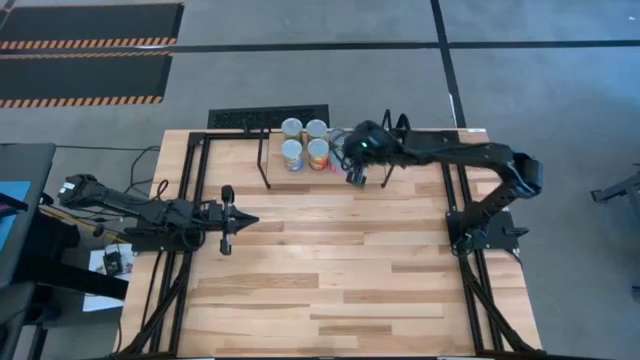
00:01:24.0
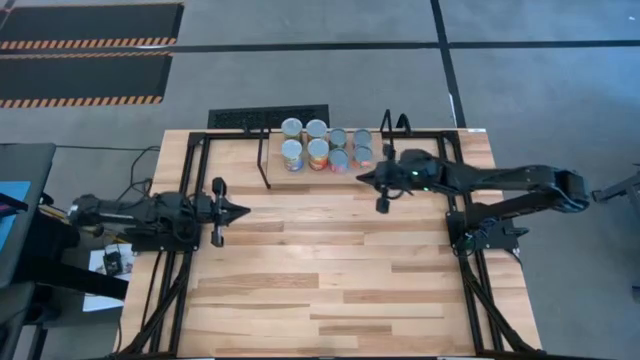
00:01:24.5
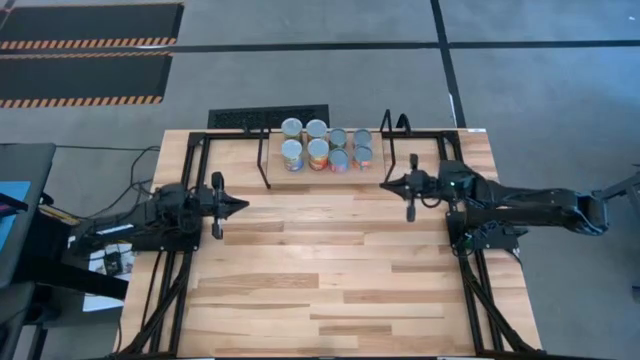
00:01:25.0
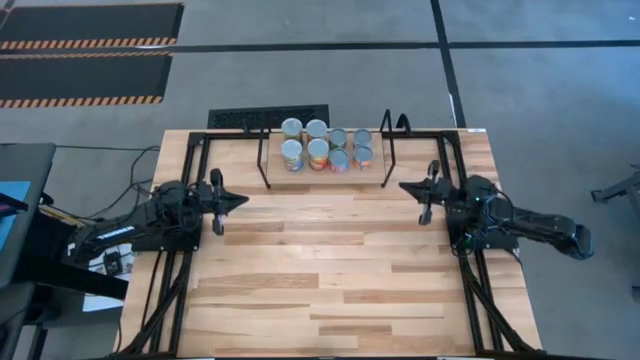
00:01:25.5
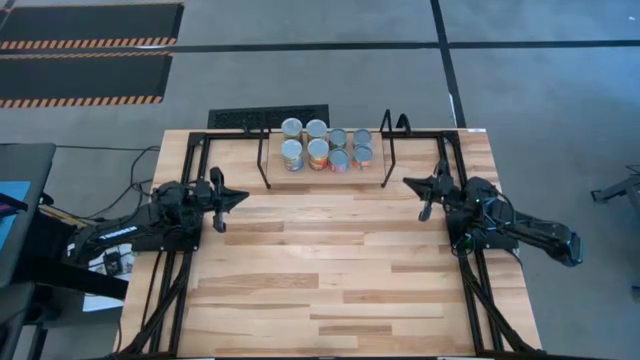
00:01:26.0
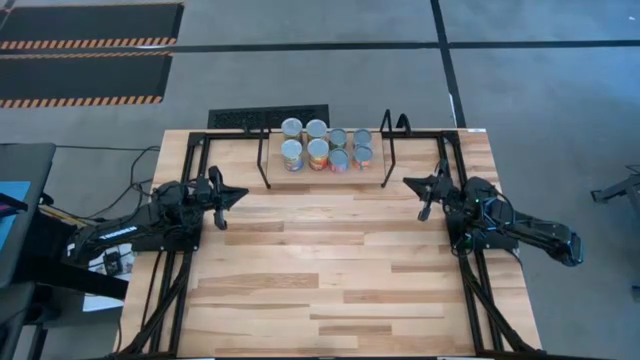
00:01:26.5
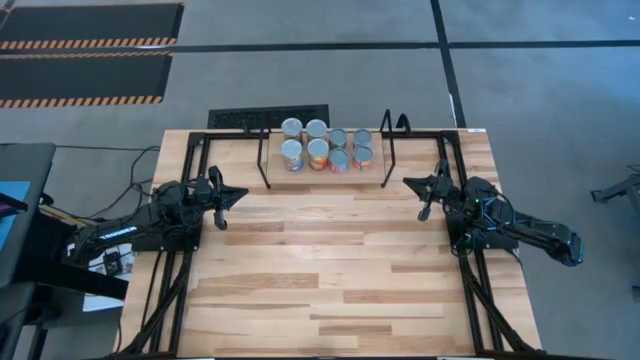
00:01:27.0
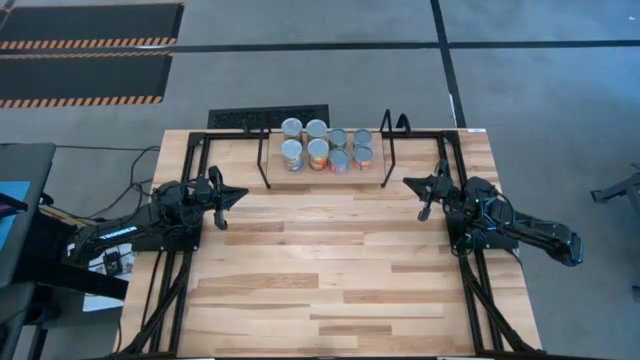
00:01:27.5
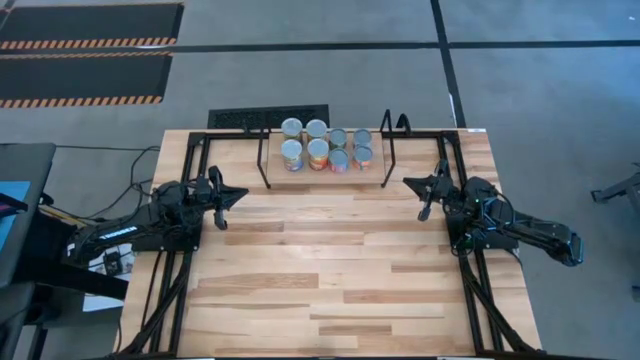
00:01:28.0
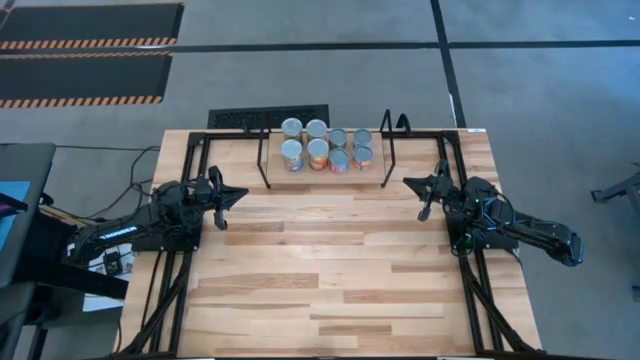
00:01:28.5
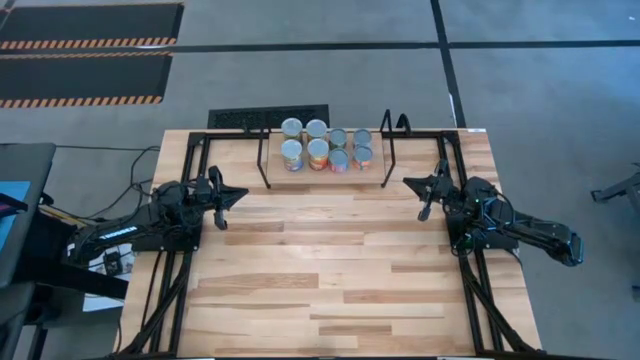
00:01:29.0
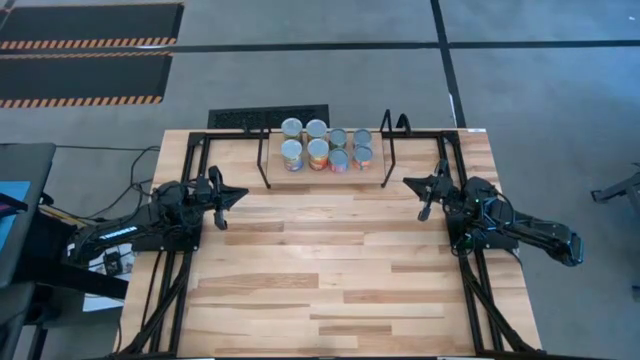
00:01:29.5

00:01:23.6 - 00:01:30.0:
Task: Pick and place cans onto a shelf
Return to Home Position

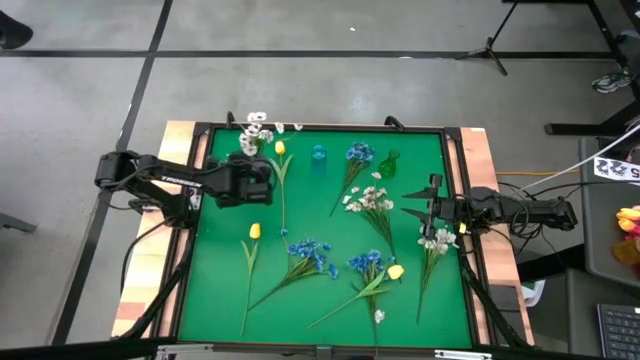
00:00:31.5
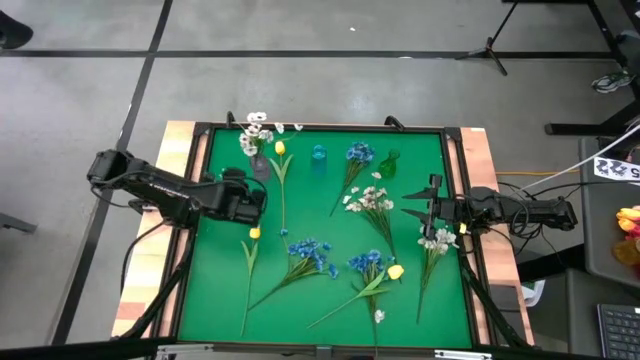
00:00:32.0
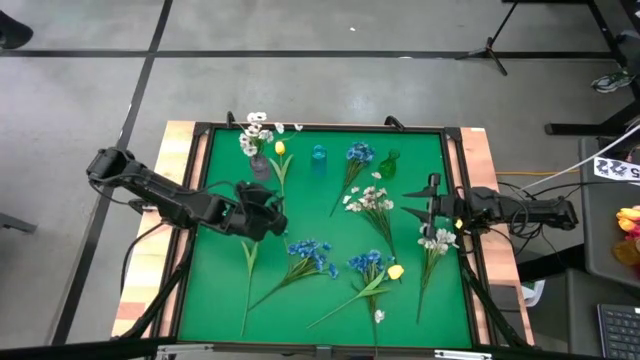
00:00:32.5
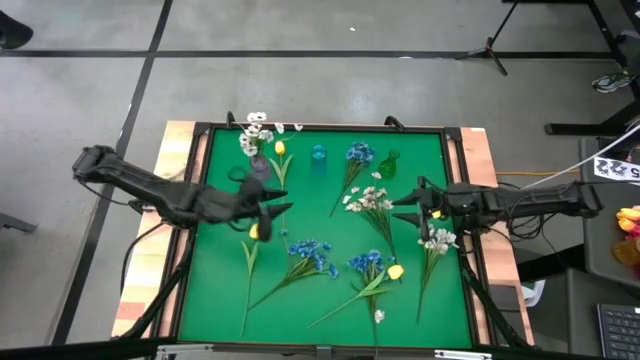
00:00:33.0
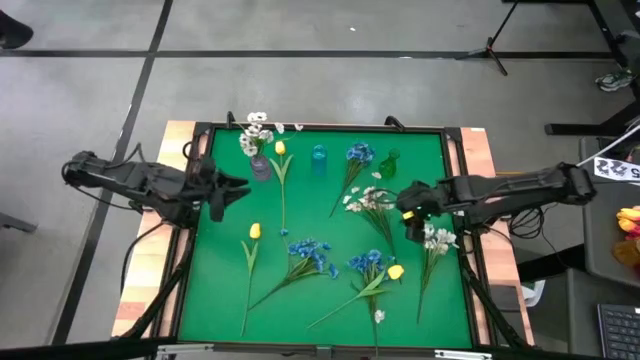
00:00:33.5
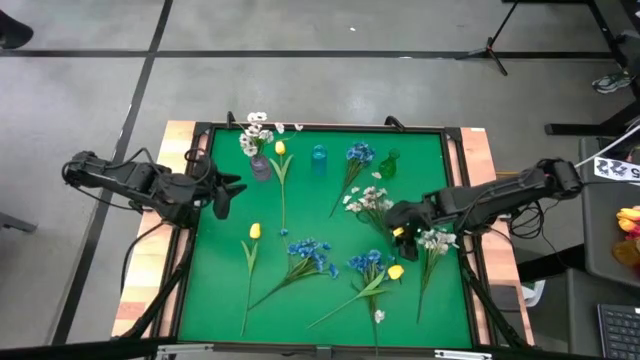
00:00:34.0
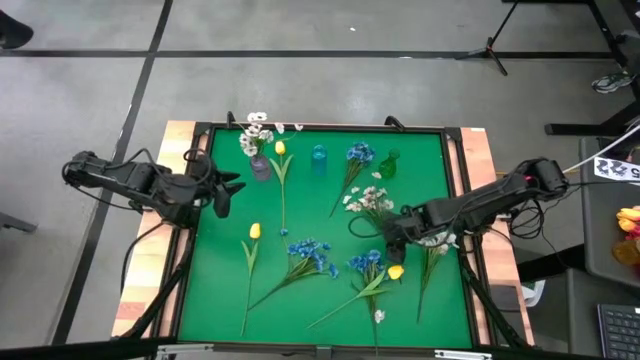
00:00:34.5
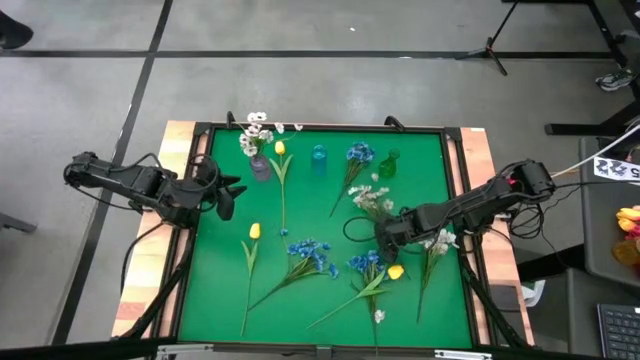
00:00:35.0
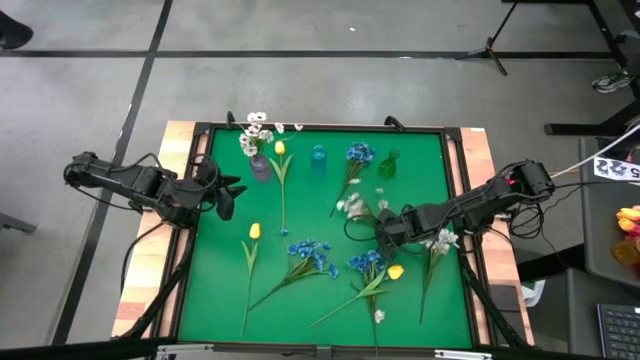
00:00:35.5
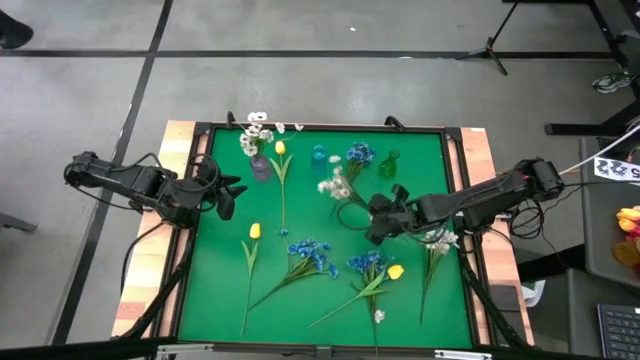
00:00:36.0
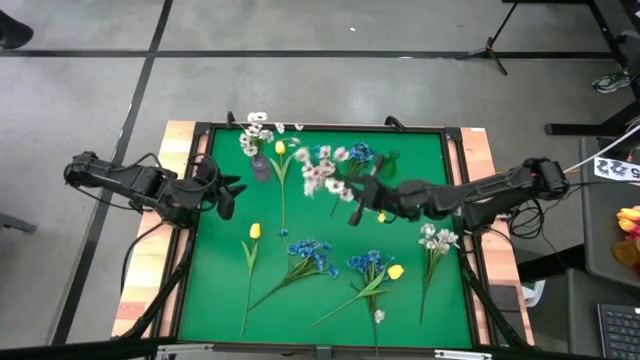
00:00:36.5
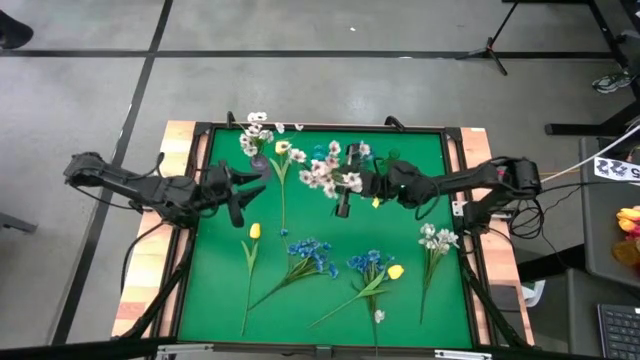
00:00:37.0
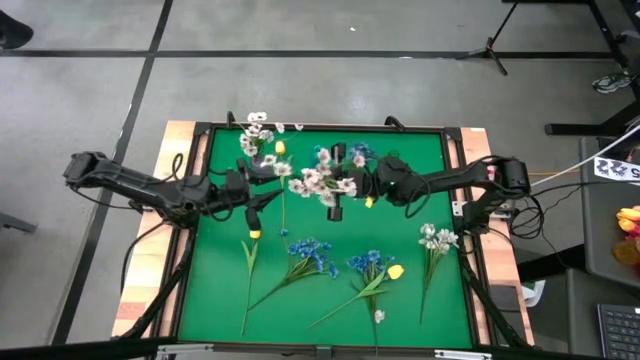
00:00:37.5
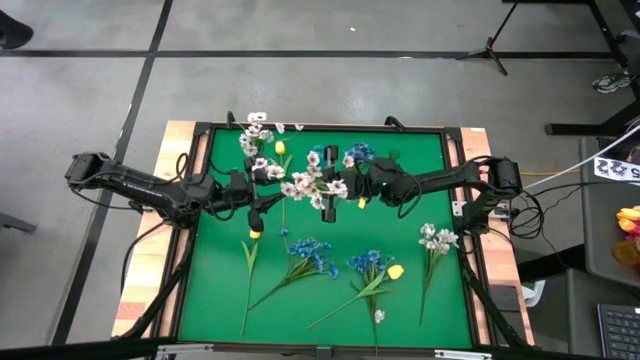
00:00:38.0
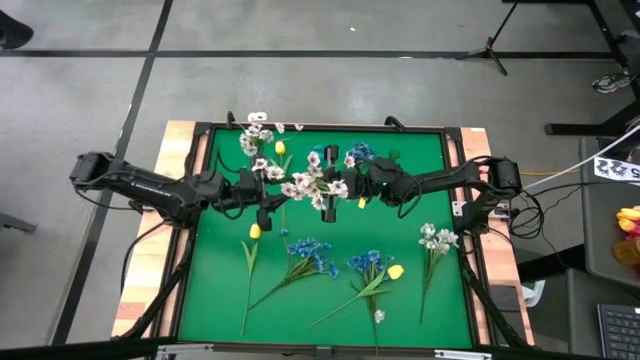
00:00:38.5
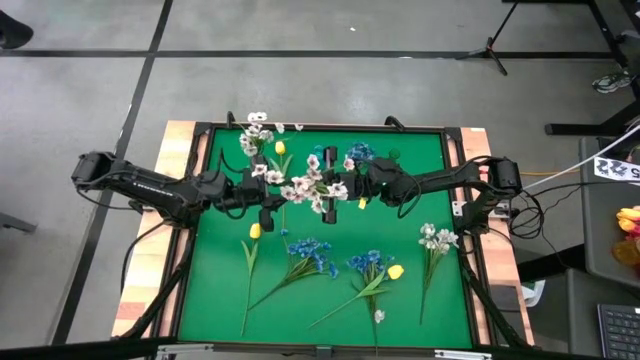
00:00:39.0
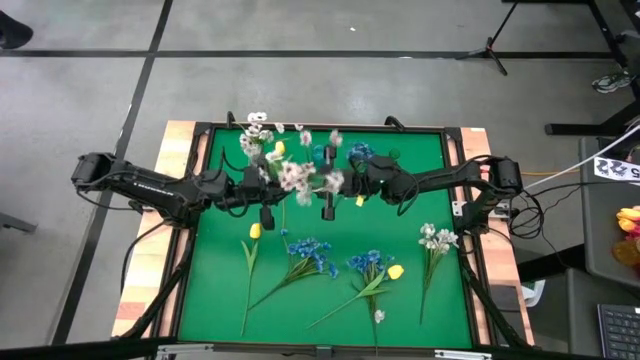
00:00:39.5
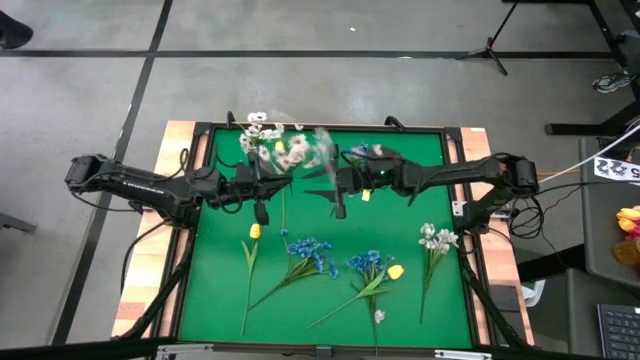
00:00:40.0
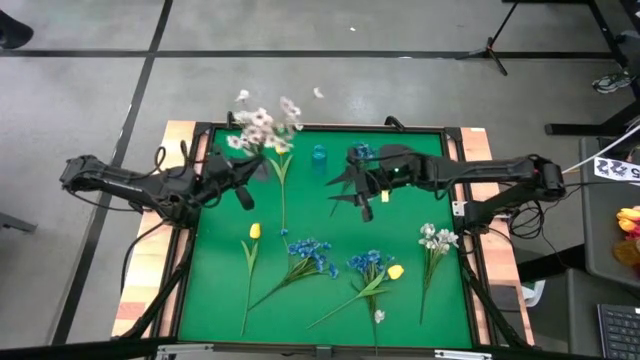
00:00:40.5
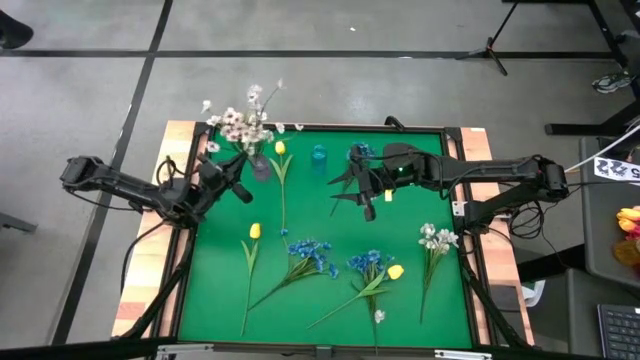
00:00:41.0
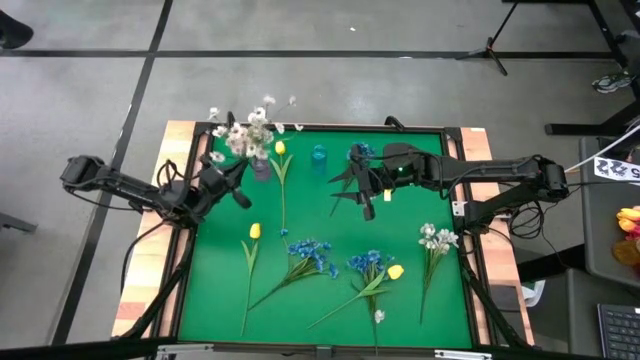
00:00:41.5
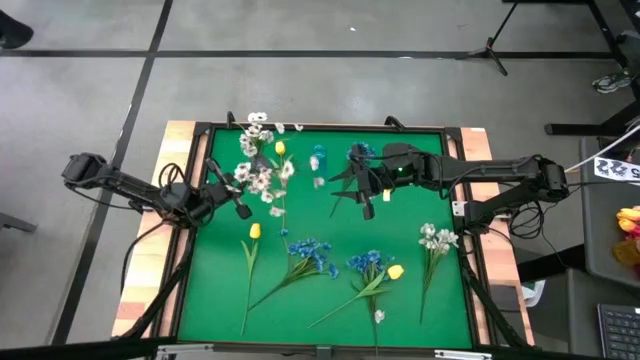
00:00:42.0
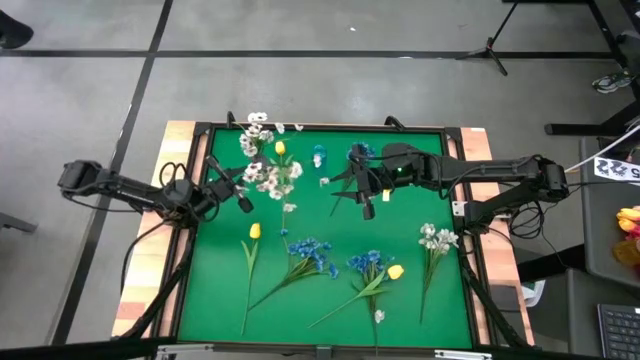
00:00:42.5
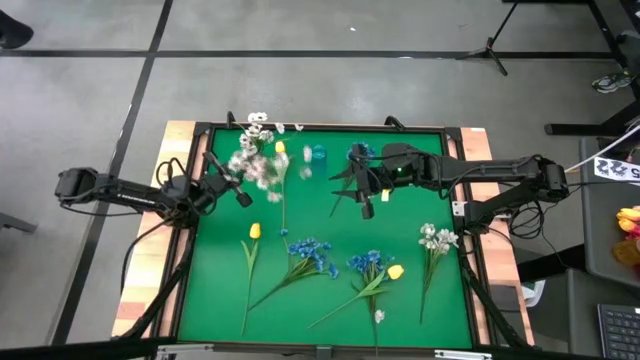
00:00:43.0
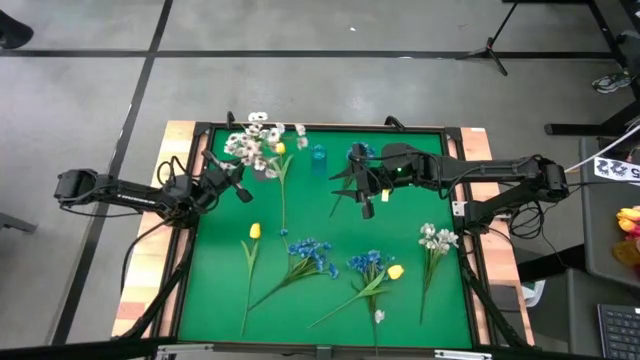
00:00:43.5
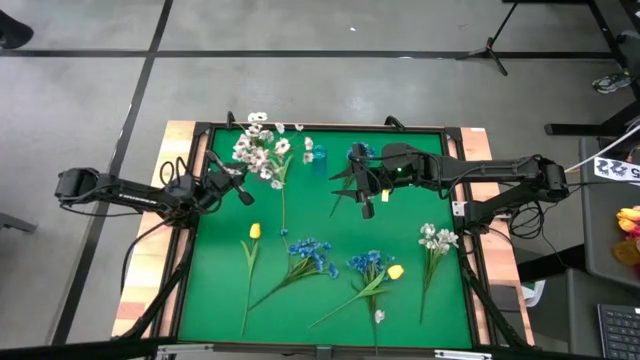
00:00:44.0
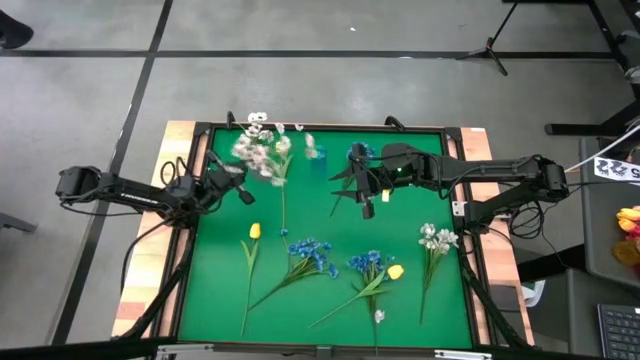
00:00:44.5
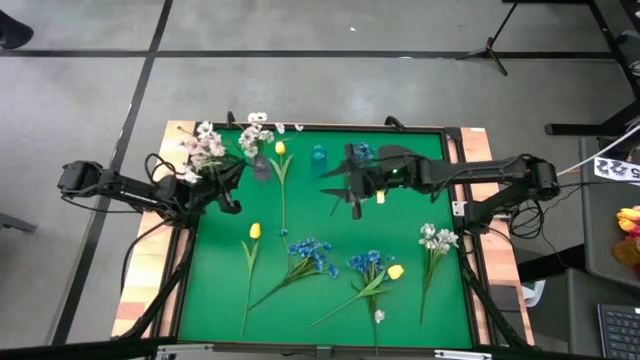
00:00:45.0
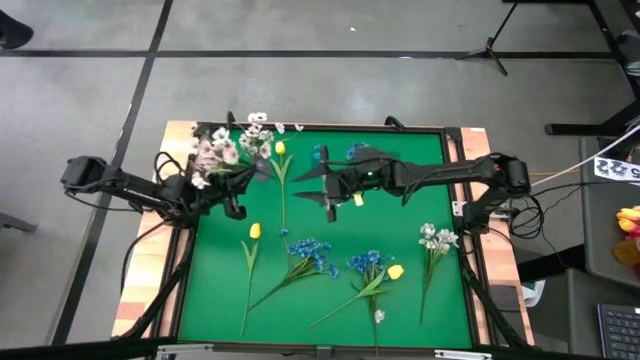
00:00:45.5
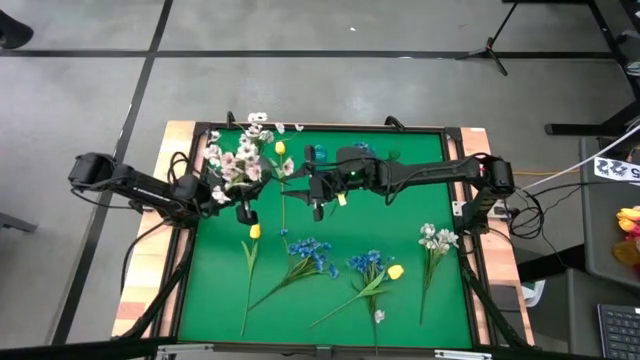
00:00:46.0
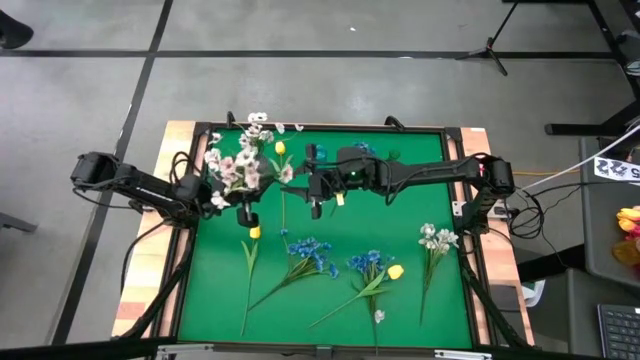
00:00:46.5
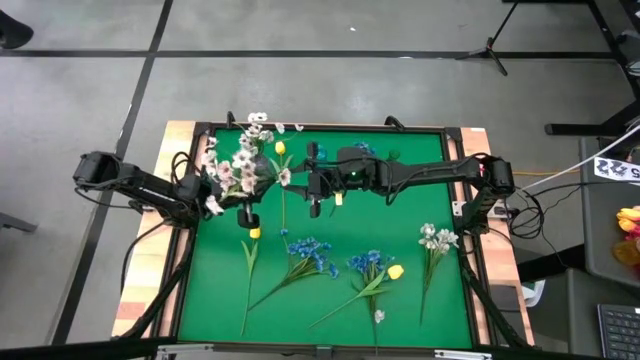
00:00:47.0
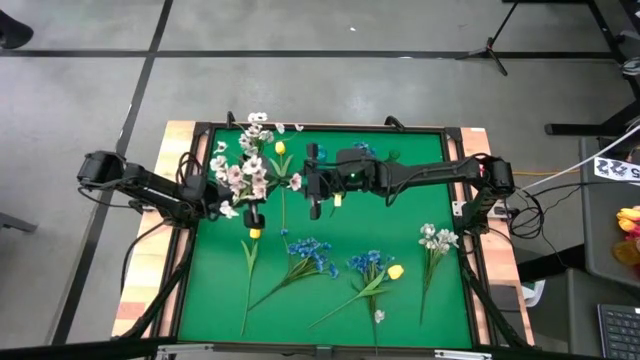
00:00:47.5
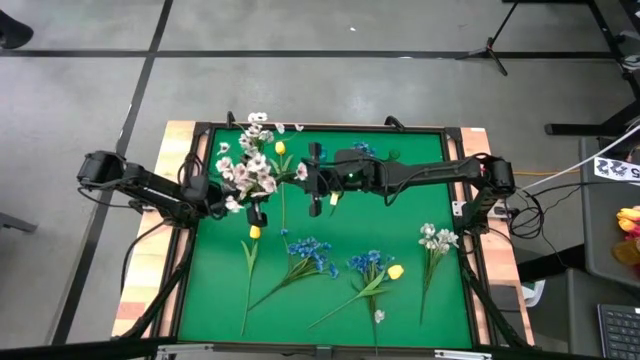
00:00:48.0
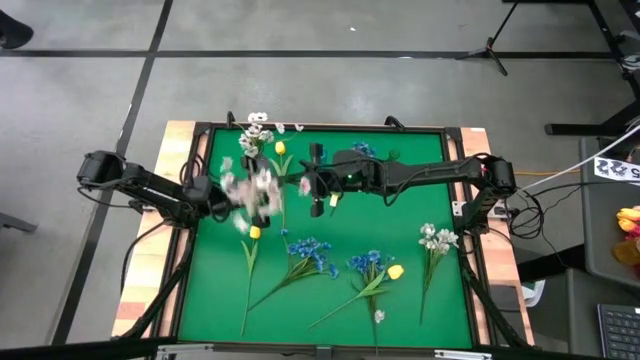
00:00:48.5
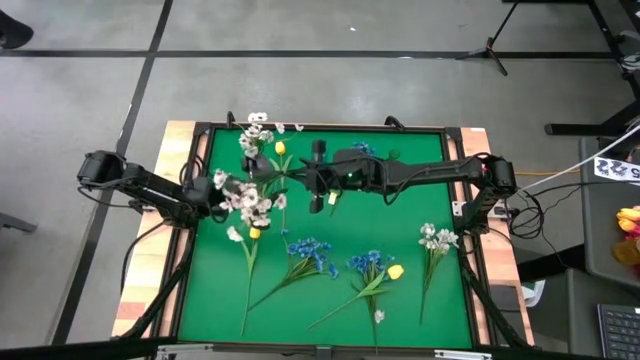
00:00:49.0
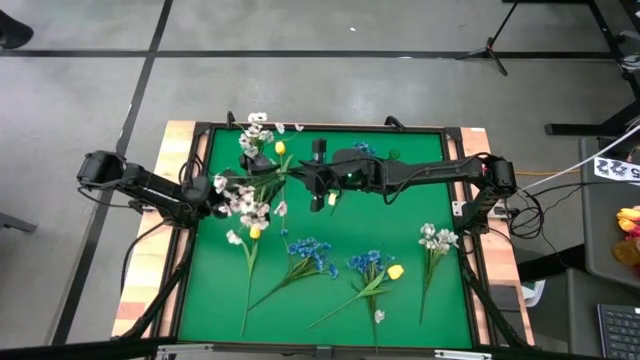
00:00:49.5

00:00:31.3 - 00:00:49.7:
Task: Sort flowers into vase by color
Put the top white flowers into the violet vase
